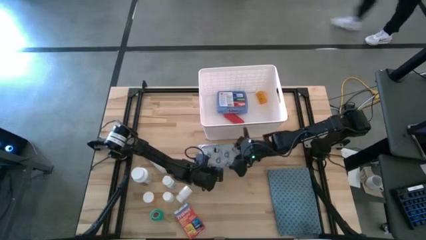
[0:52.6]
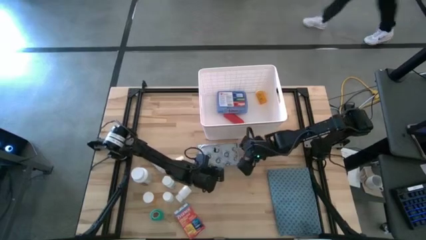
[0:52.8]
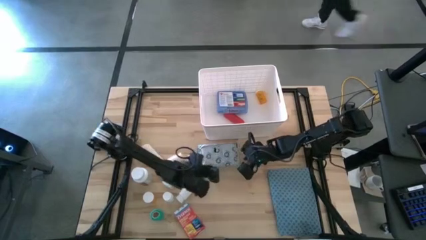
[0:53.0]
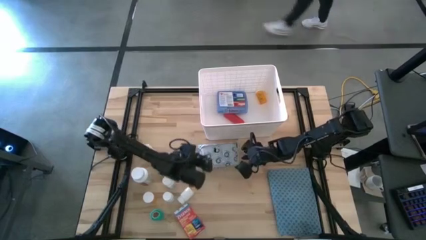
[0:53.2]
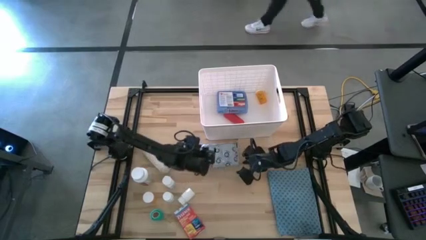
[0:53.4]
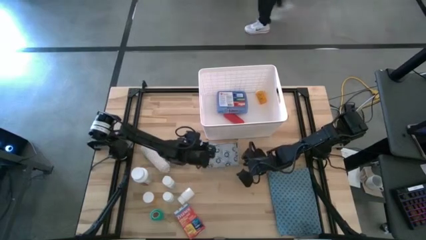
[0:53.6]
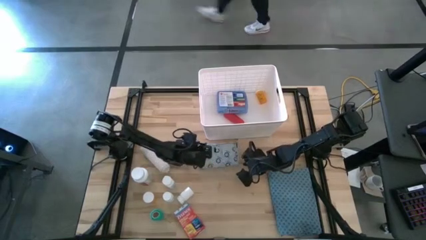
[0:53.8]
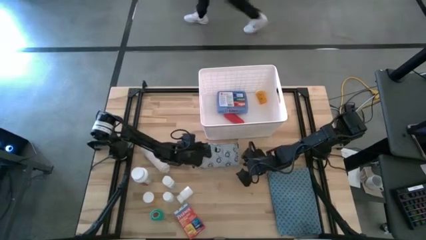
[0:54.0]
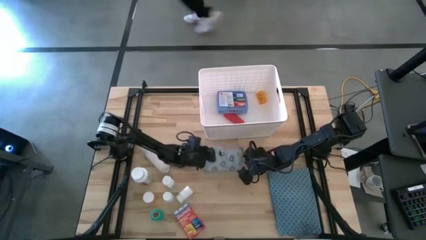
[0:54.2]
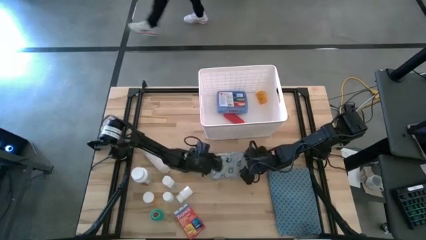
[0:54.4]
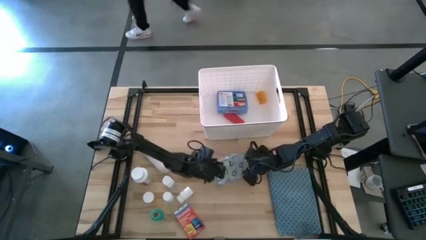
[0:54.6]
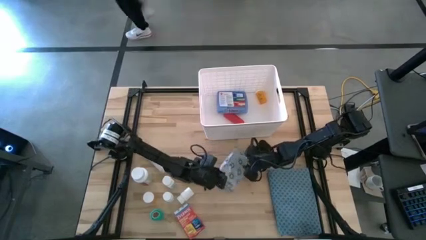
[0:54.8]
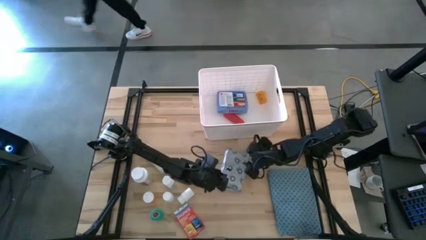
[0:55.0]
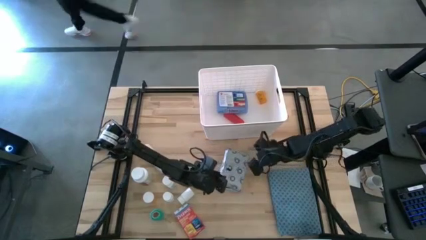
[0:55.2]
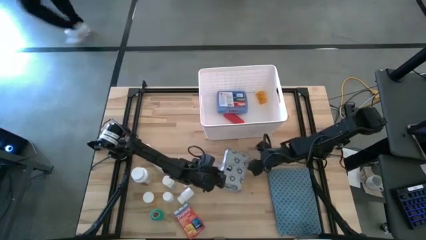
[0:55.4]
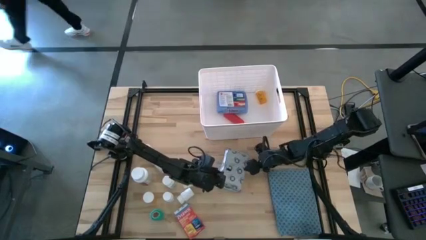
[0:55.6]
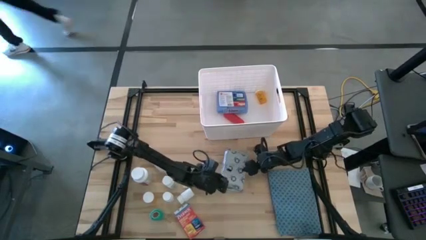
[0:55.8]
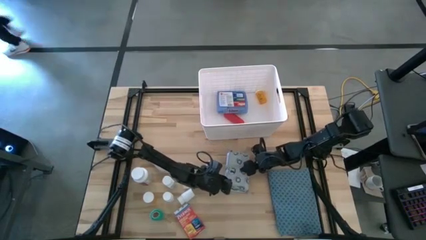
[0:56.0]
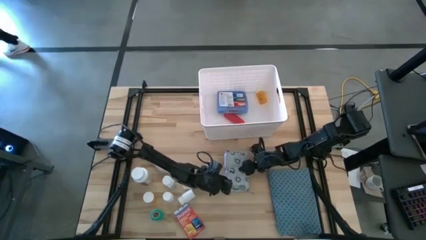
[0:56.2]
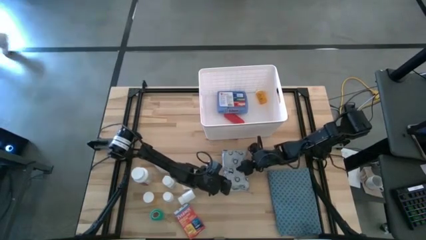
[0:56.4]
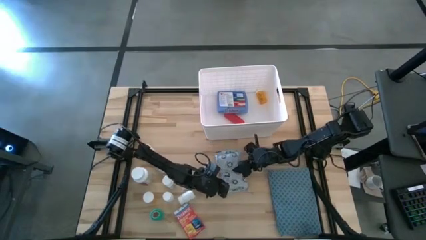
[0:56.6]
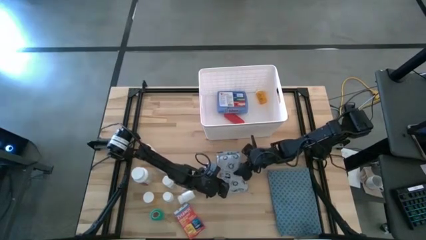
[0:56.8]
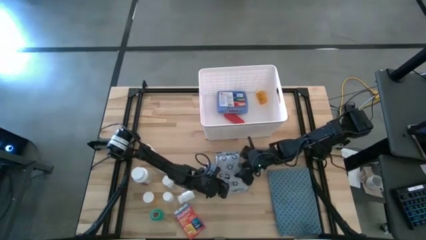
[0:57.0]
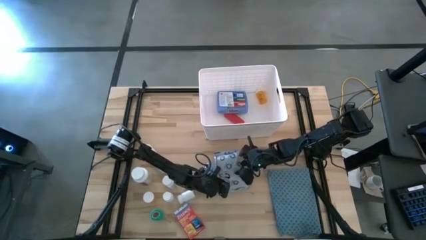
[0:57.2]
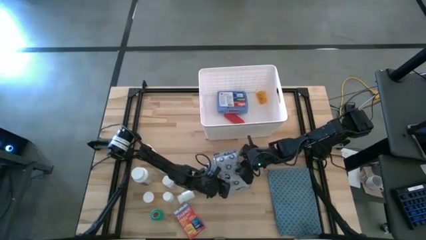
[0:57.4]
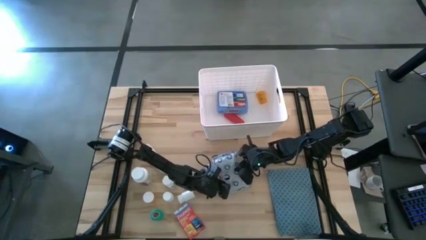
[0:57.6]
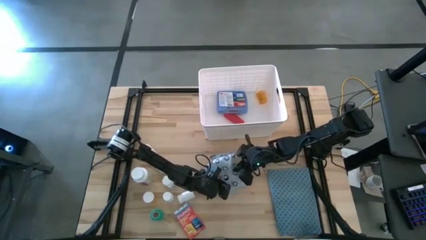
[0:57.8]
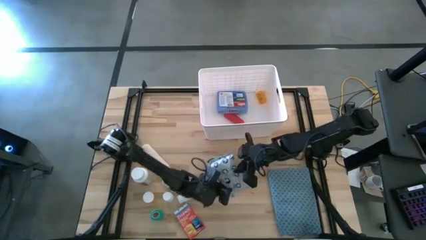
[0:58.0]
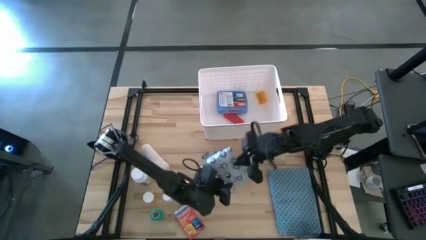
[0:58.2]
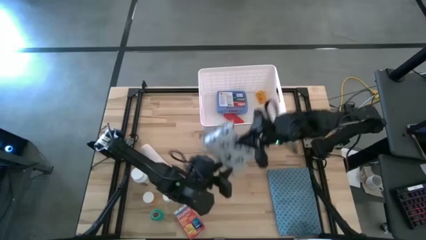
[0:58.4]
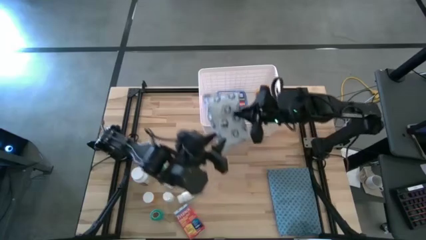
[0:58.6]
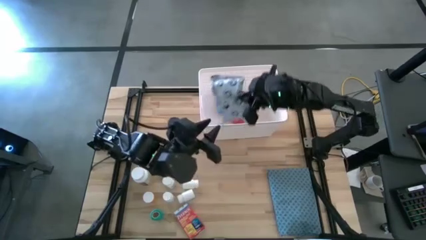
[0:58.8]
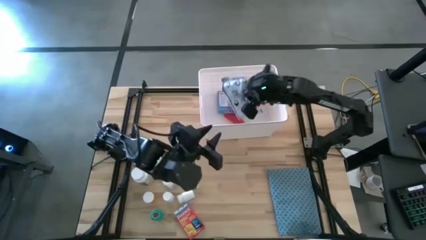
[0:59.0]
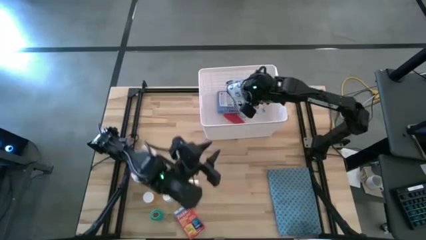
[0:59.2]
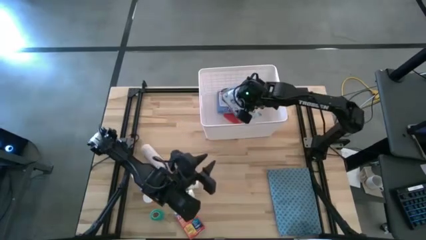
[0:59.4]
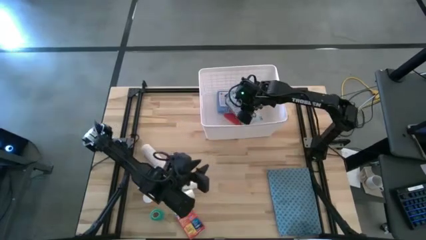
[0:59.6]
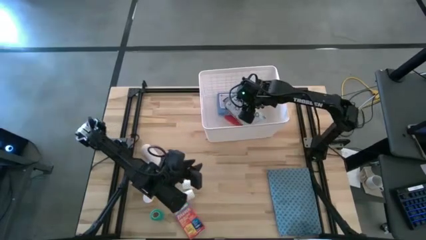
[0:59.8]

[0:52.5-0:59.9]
Task: Pick & place medical supplies in basket/bin
Put the white mailer bag into the white bin

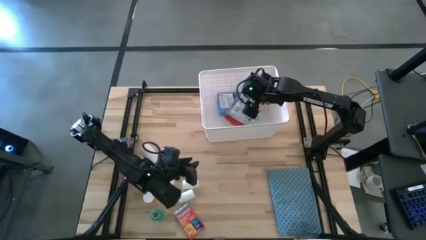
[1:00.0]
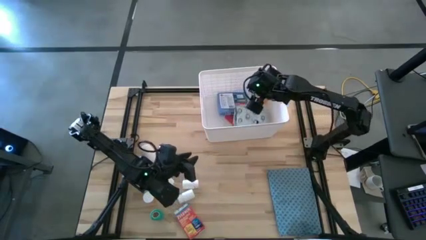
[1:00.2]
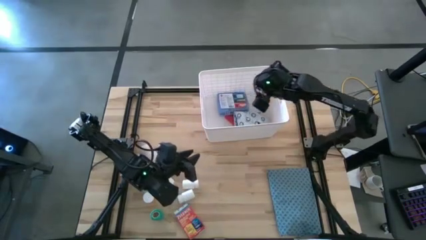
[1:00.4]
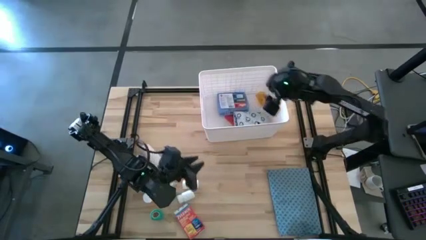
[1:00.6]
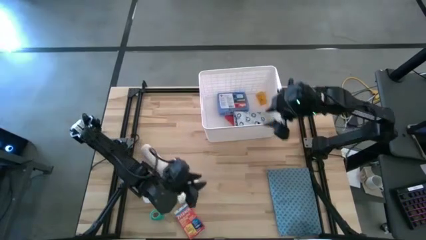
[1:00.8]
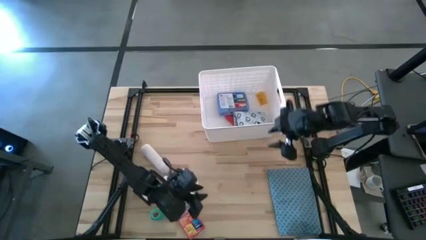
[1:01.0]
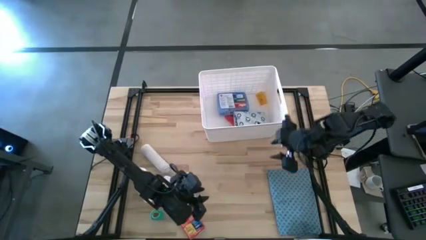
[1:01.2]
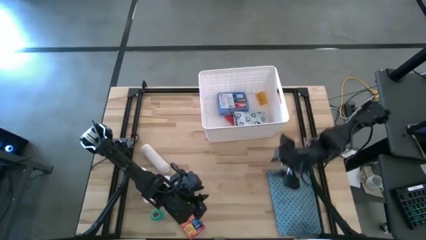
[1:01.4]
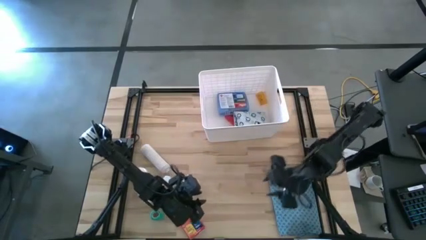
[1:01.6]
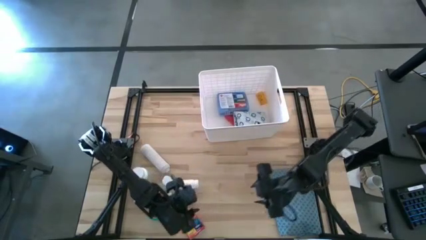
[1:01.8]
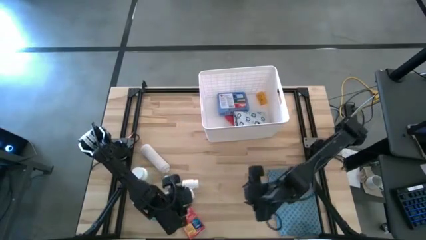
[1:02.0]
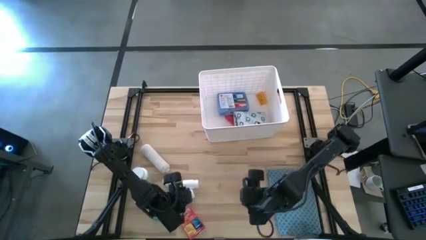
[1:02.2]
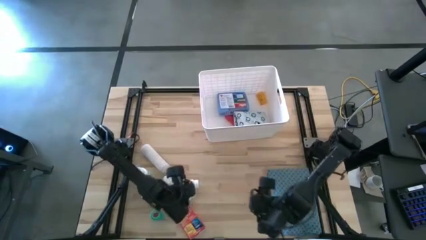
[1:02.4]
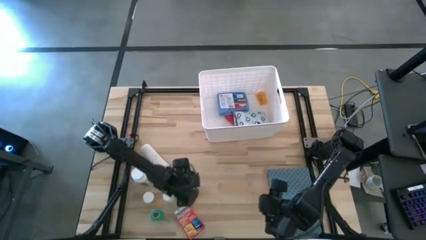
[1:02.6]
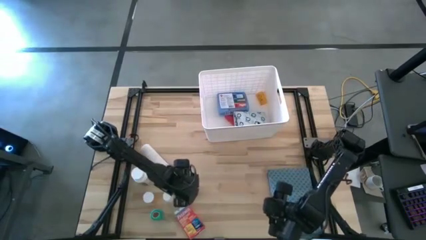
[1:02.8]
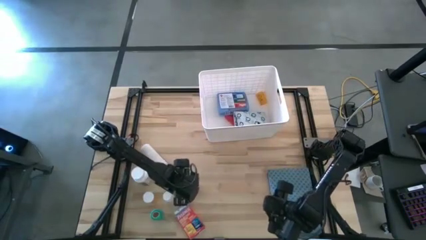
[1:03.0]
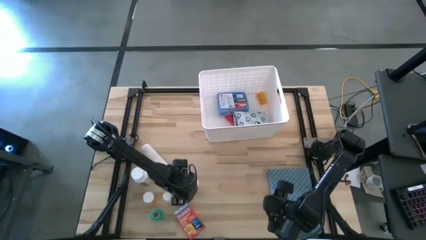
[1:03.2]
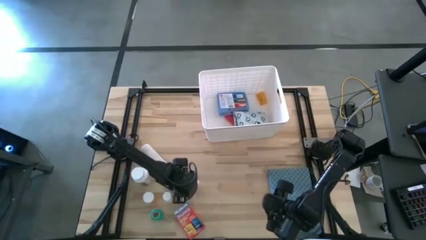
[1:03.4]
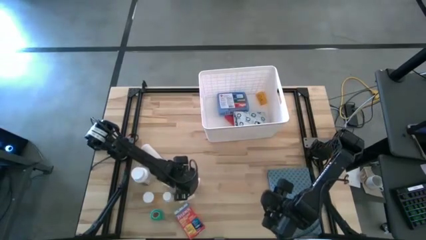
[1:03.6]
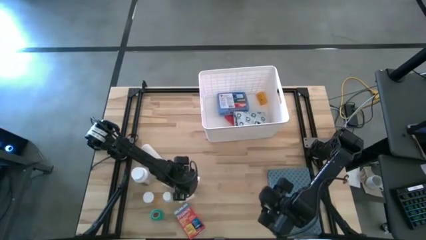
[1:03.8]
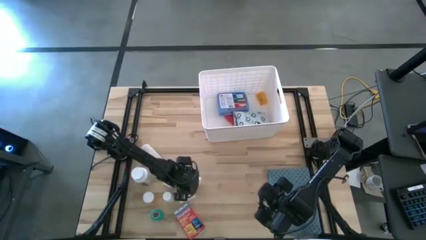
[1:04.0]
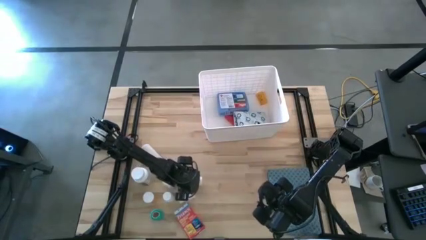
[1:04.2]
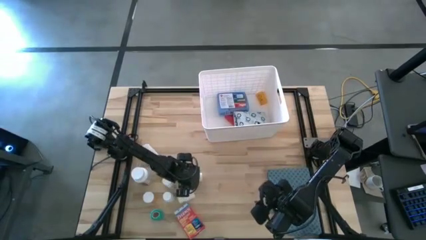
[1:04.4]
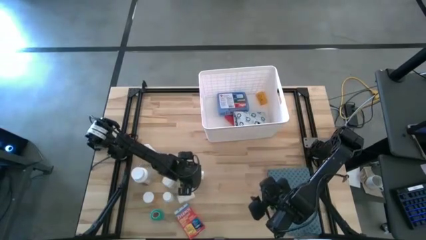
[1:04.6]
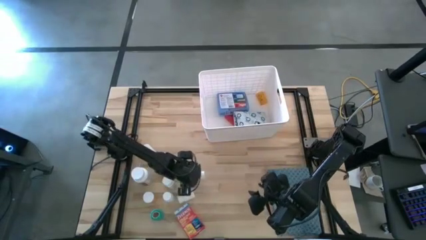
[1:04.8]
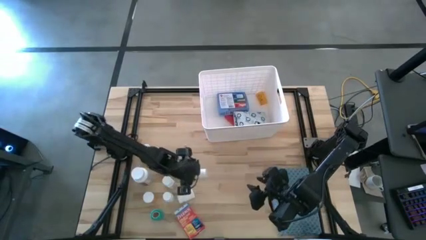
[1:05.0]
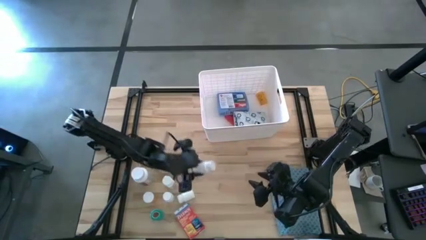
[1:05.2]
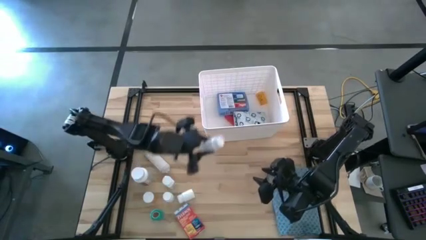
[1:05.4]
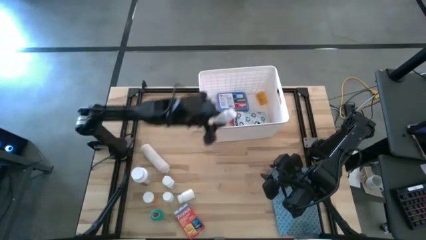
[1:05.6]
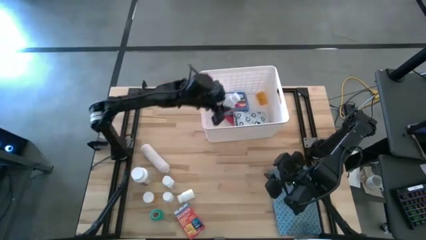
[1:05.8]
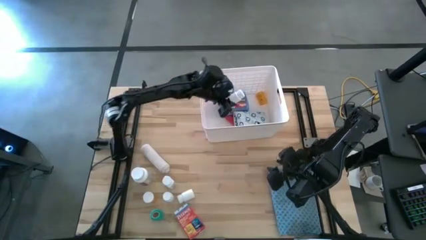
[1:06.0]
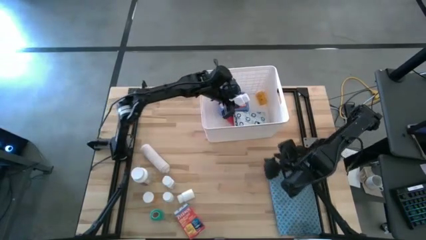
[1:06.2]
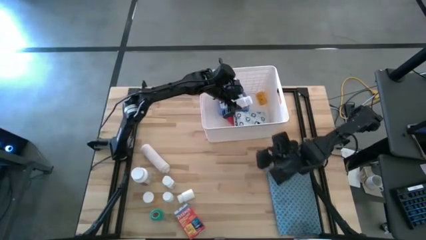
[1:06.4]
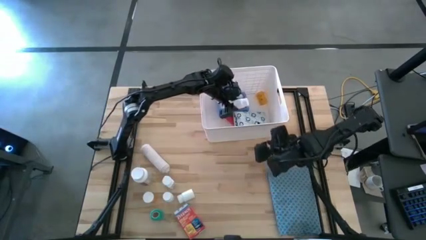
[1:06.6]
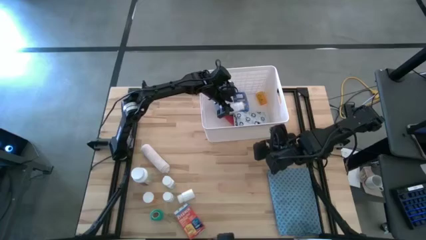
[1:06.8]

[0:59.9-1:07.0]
Put the top white medicine bottle into the white bin

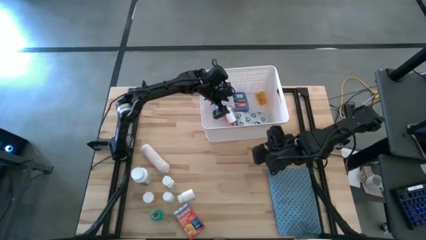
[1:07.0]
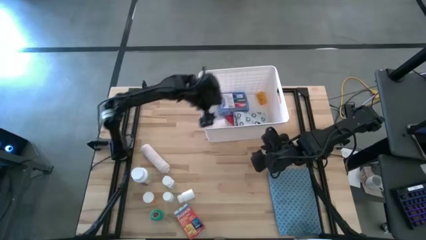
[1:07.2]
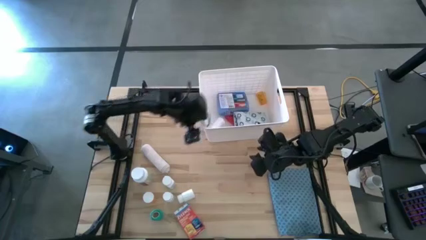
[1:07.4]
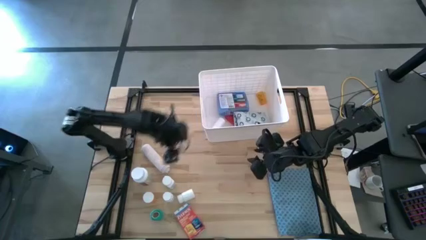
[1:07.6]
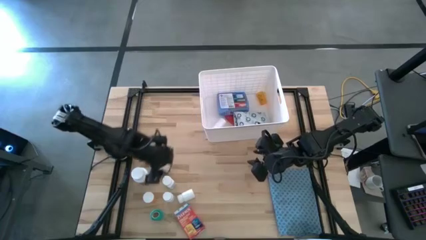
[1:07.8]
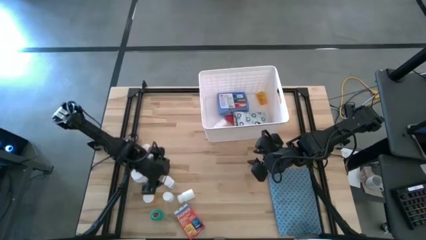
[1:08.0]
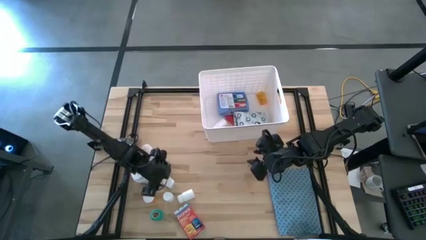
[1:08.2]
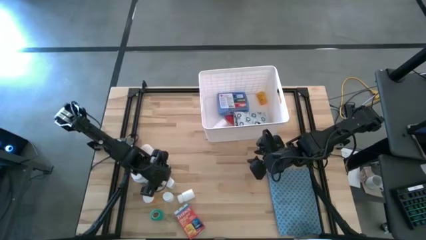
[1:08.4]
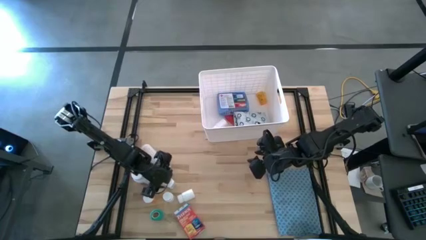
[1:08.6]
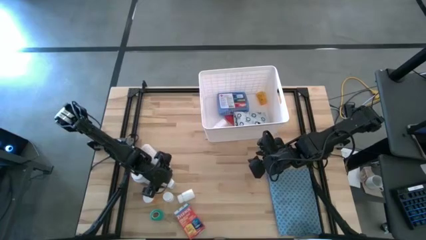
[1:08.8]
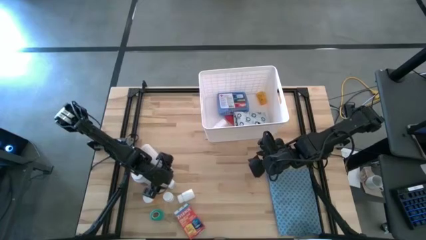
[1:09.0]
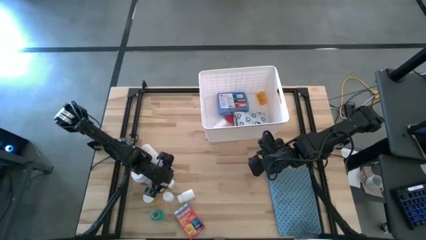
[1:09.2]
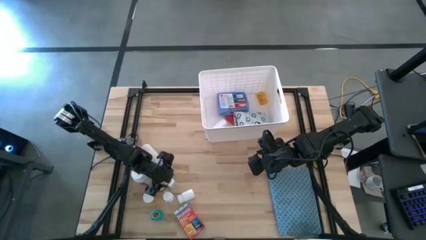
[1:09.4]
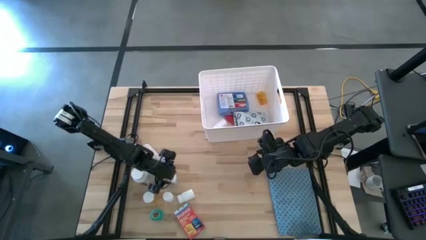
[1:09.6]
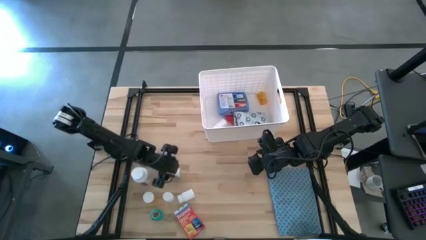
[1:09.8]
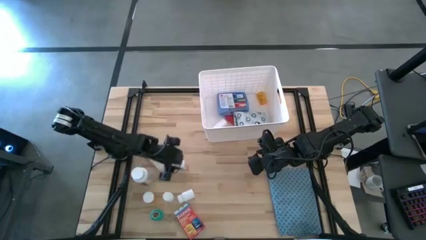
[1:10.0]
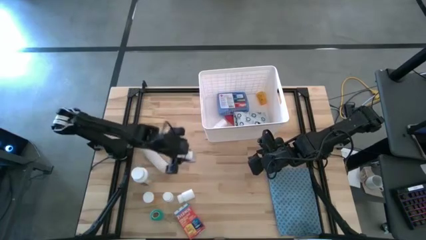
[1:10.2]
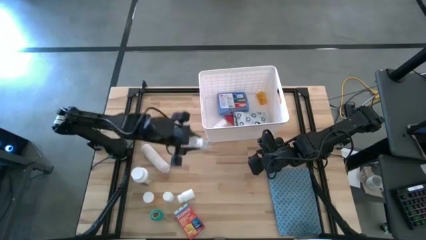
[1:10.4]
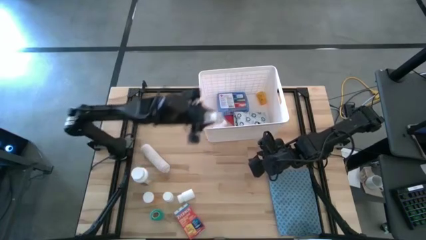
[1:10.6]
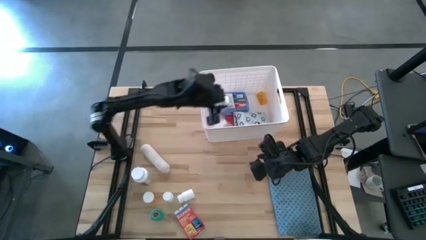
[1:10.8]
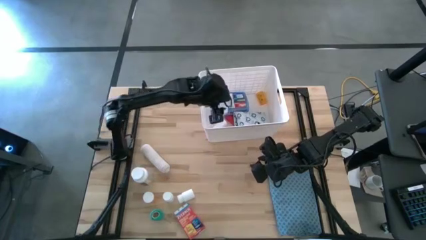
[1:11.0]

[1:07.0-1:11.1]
Put the blue and white medicine bottle into the white bin
